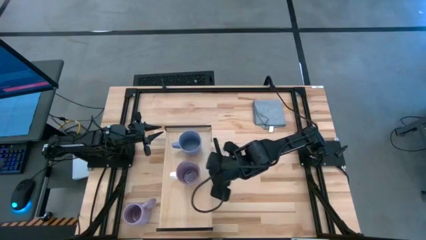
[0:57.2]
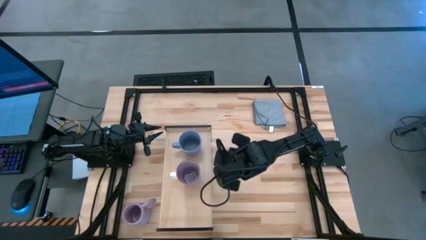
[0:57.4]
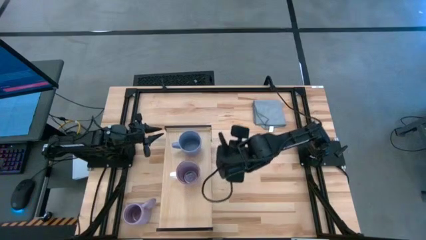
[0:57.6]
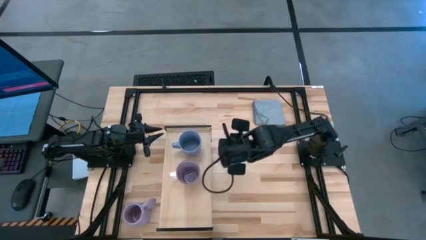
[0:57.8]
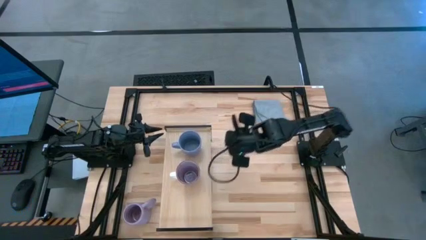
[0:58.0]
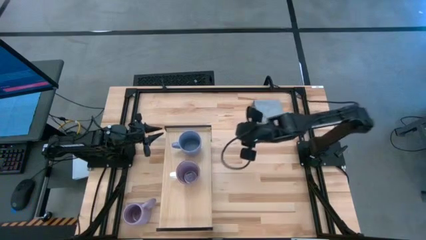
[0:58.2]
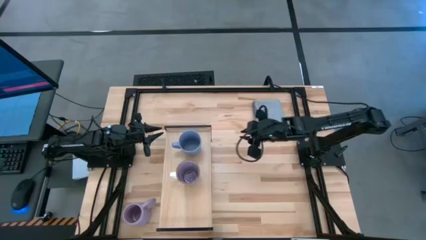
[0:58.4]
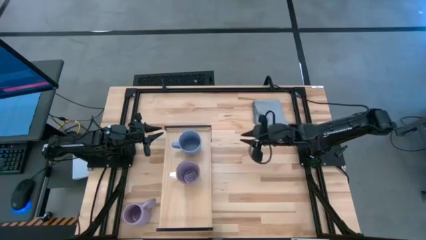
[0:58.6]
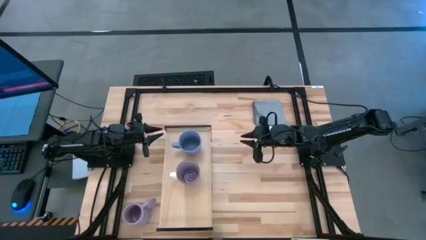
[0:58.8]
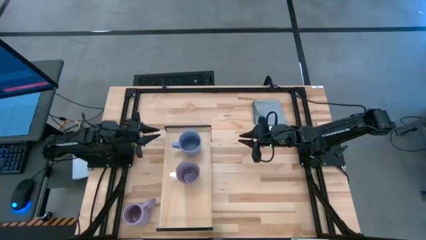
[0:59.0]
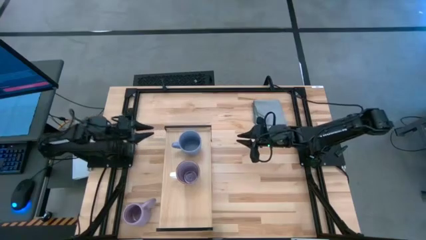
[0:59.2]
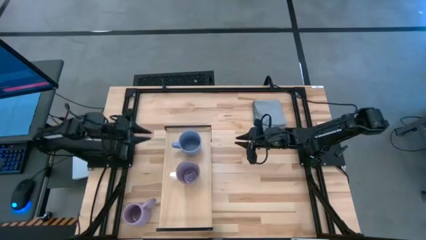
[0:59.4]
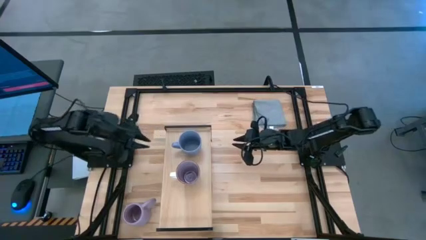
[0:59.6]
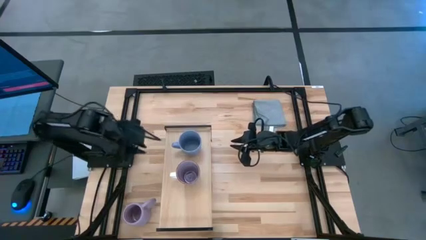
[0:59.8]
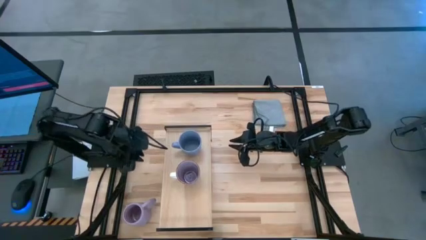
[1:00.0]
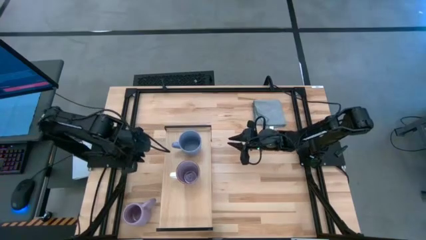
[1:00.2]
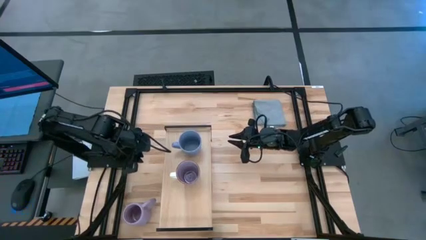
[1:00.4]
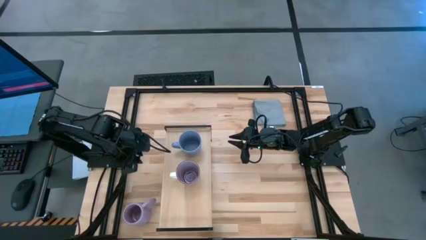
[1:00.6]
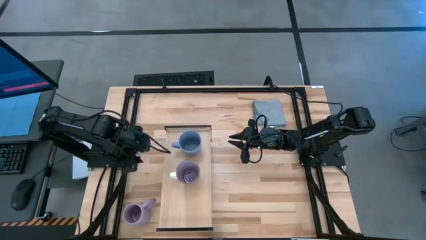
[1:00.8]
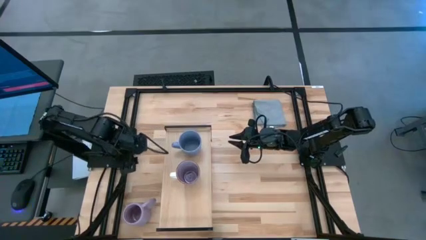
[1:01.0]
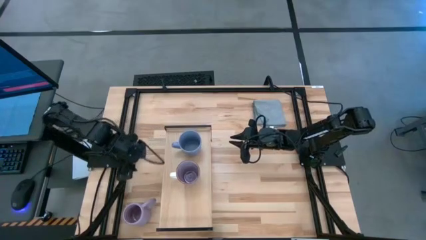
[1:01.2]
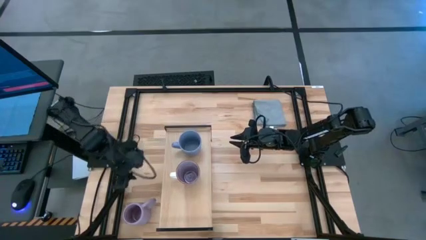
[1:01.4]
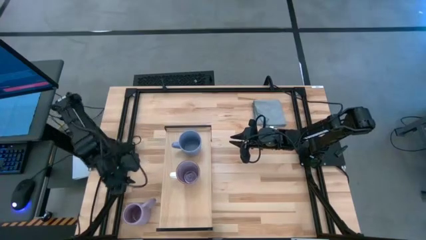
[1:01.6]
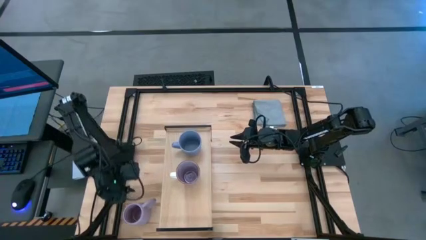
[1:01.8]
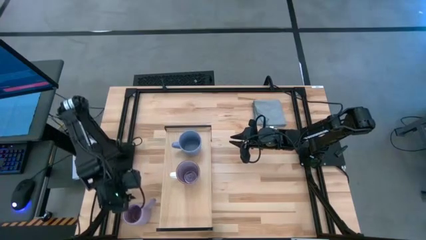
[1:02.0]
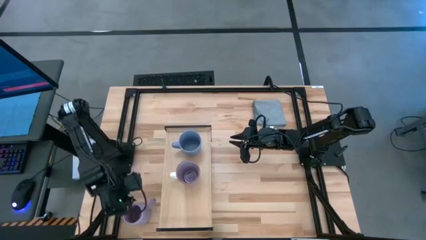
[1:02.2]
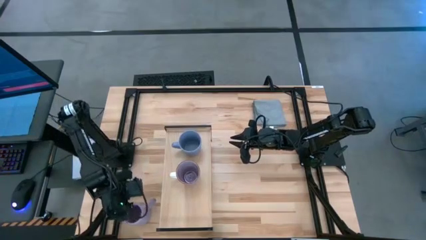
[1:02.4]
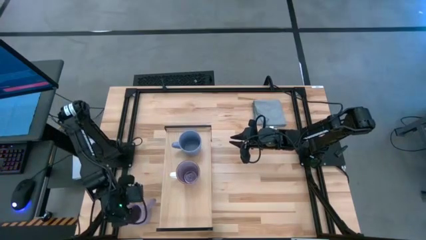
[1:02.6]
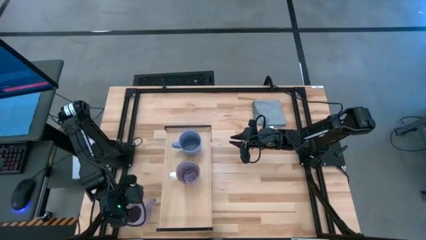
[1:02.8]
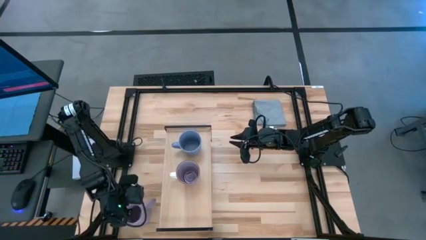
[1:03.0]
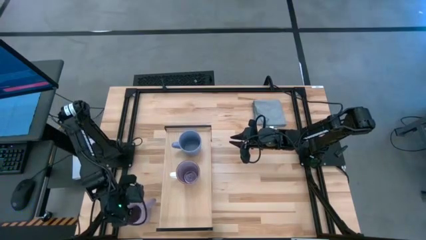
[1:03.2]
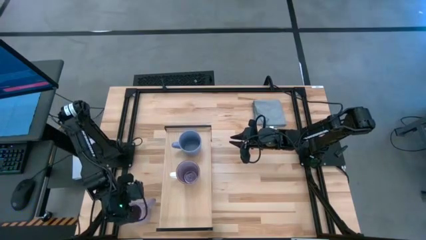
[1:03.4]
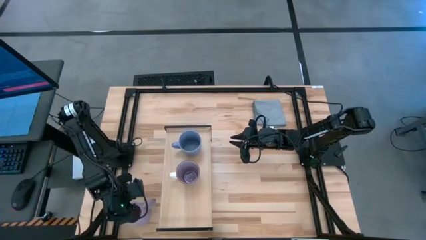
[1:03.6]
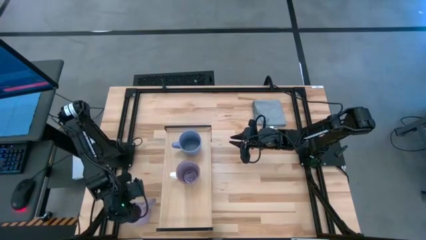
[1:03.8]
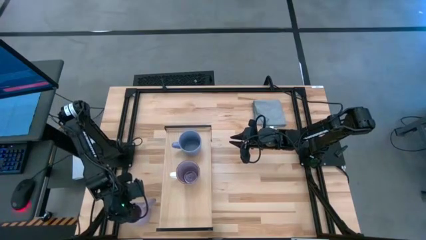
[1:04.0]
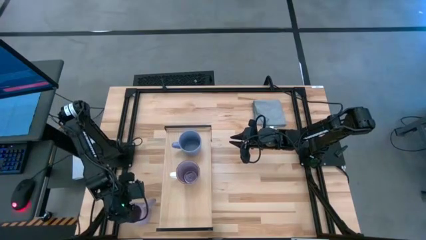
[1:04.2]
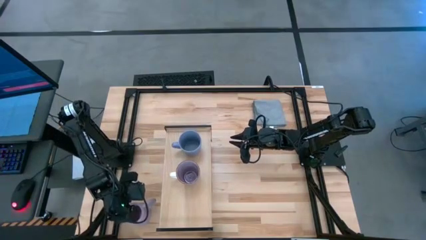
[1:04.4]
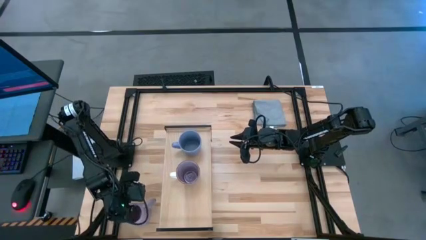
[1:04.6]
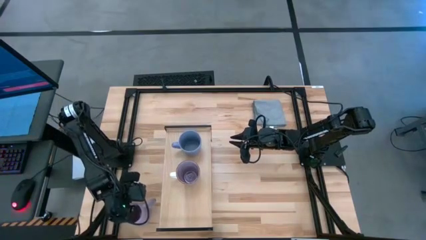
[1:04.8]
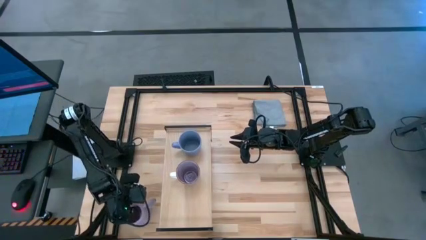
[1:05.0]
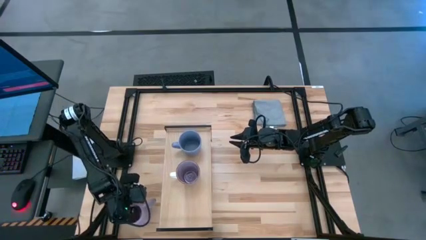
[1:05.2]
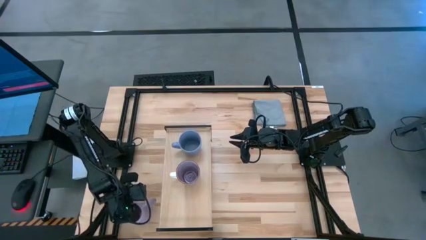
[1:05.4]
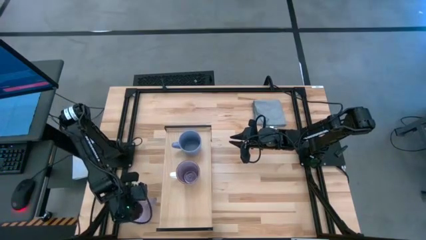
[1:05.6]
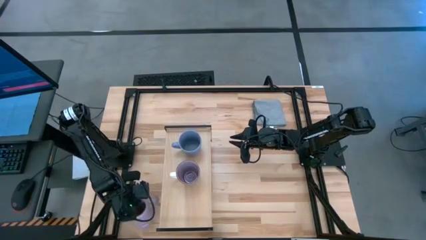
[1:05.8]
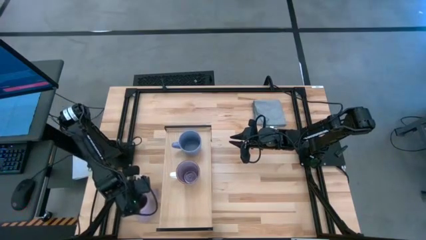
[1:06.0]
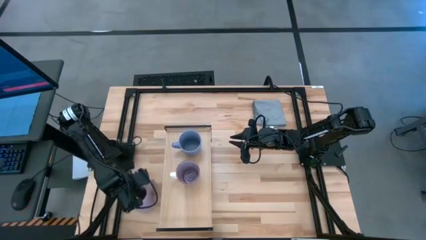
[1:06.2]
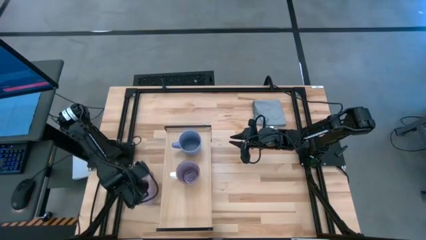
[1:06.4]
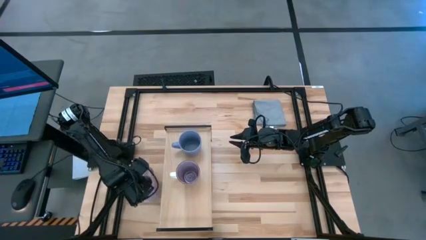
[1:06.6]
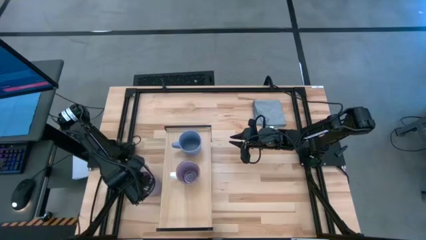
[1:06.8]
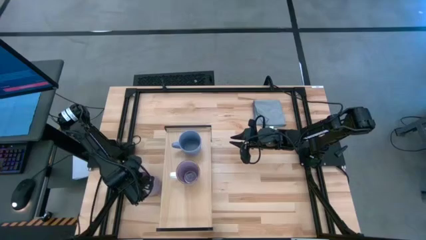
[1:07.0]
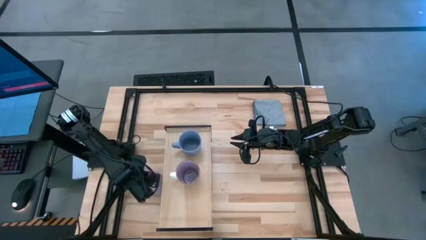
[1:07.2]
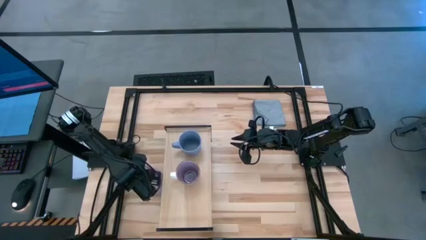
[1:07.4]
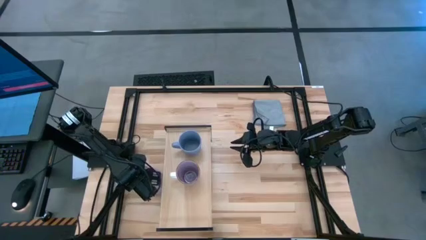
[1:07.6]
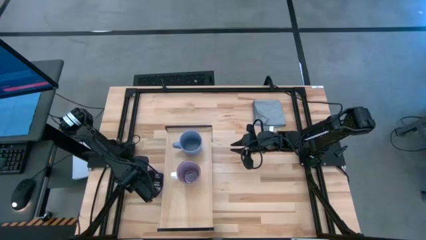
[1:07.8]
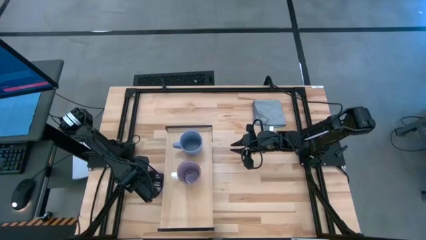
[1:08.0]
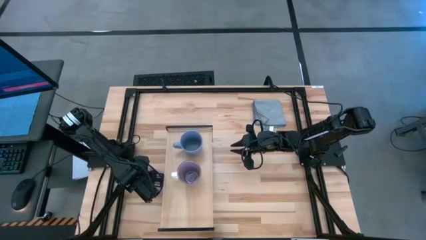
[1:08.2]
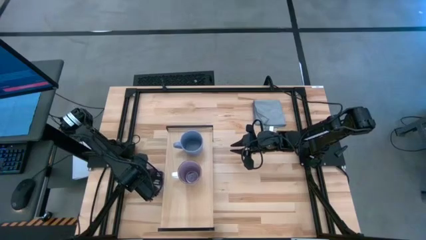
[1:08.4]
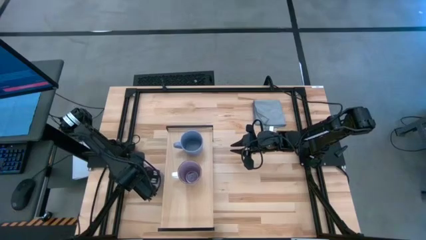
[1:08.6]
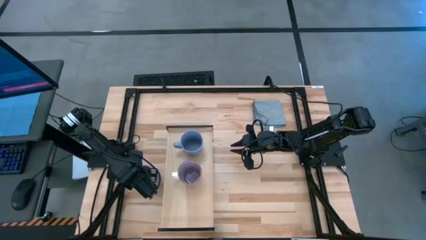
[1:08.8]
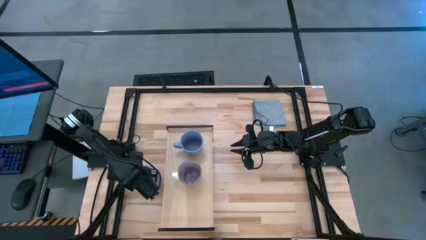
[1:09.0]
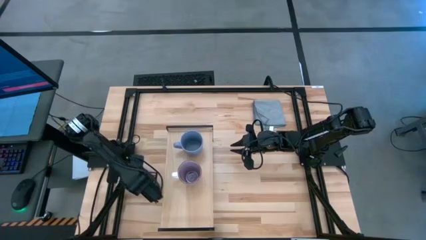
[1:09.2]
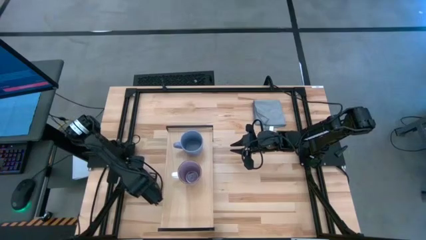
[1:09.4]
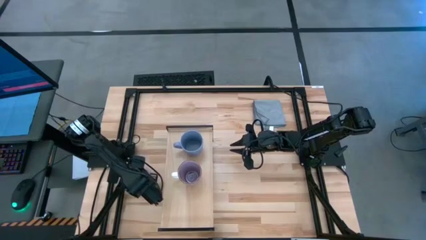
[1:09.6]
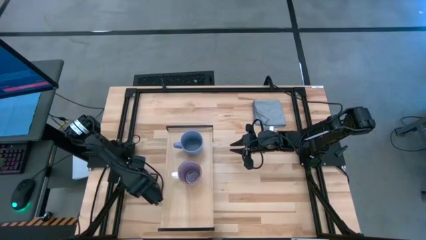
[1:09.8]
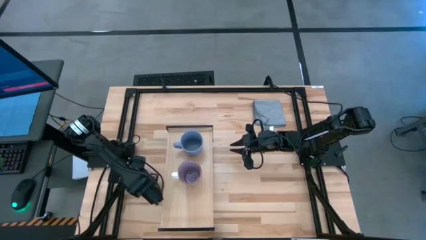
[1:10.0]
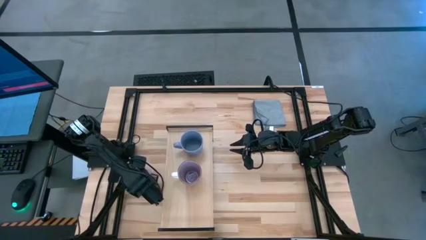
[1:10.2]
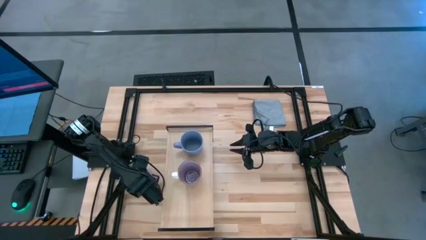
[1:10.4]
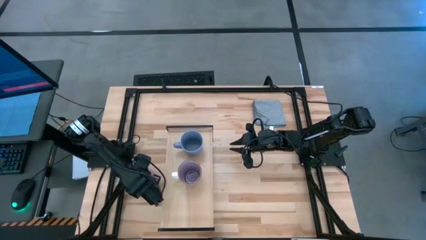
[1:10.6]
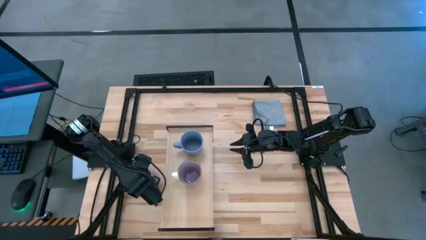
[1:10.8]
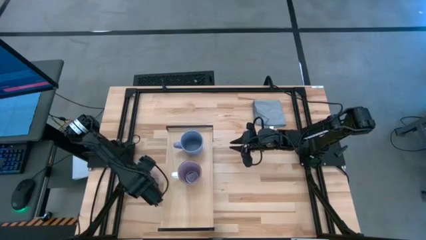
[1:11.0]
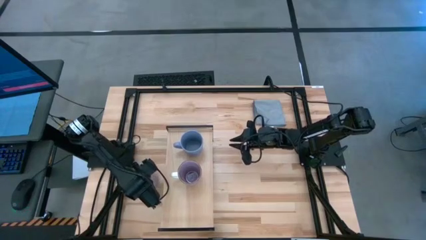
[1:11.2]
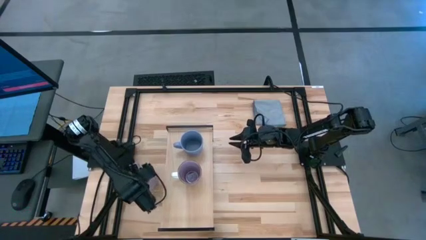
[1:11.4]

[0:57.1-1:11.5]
Task: Stack small to large cups/mugs on shelf
Put the purple mug on the shelf
